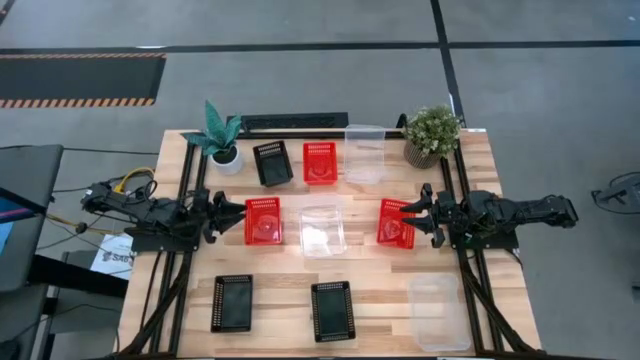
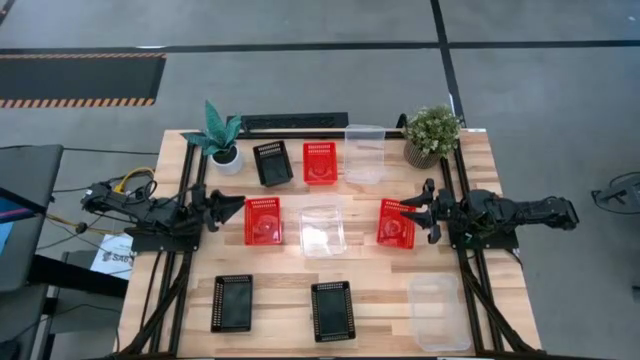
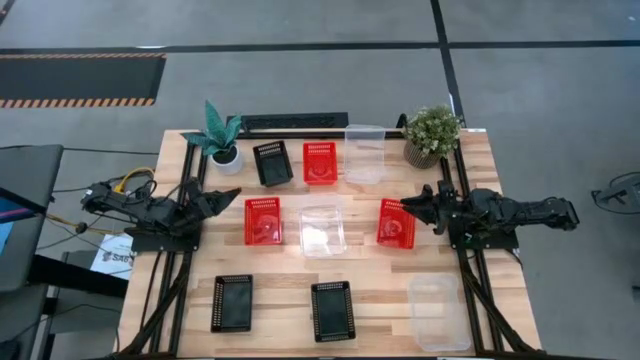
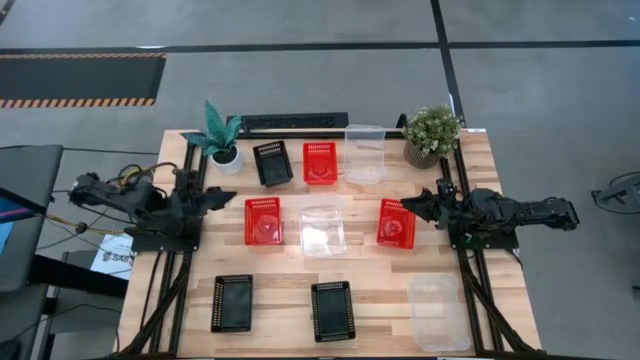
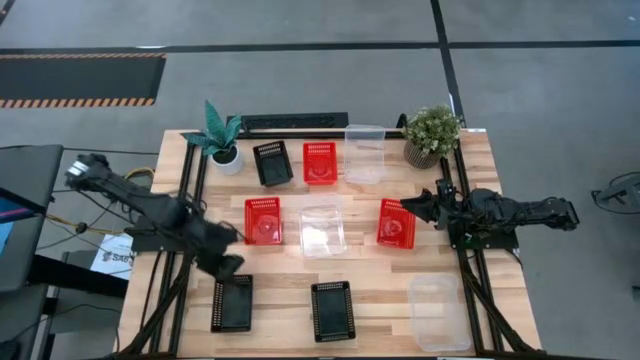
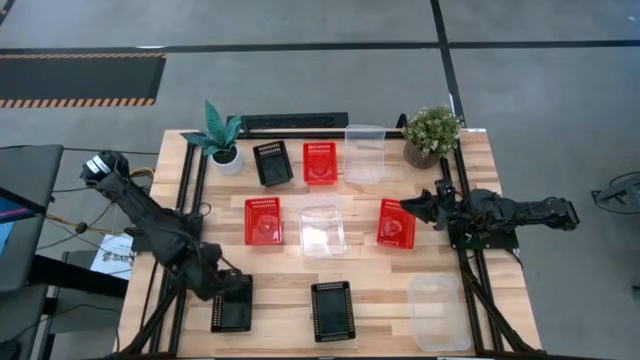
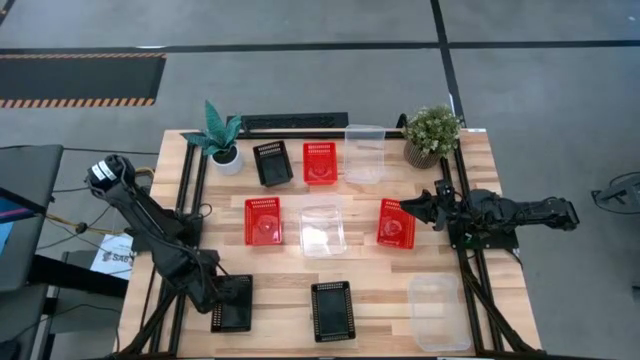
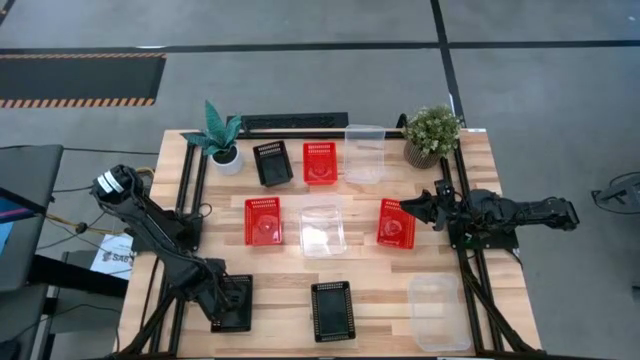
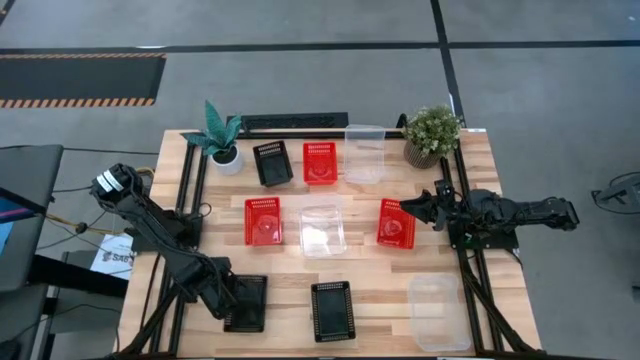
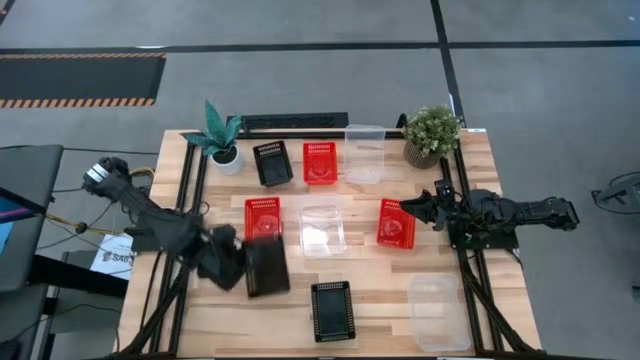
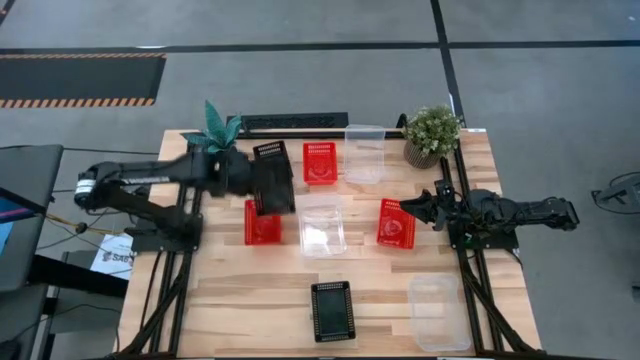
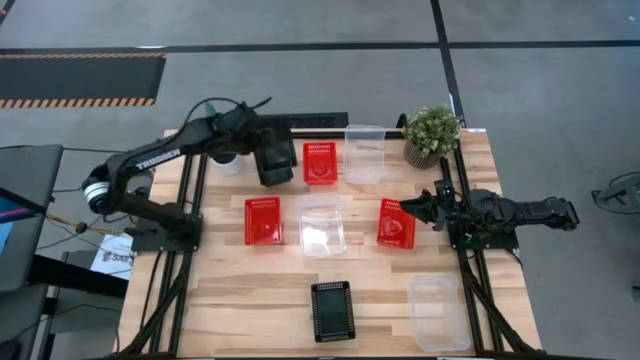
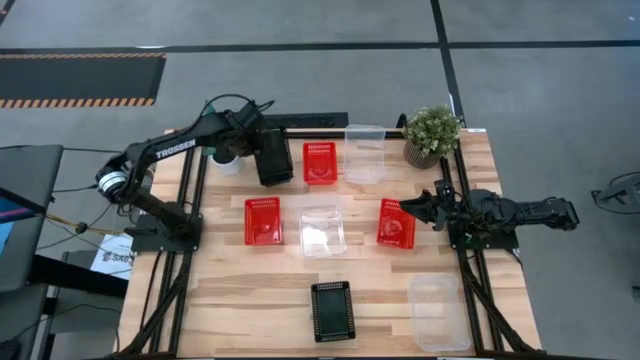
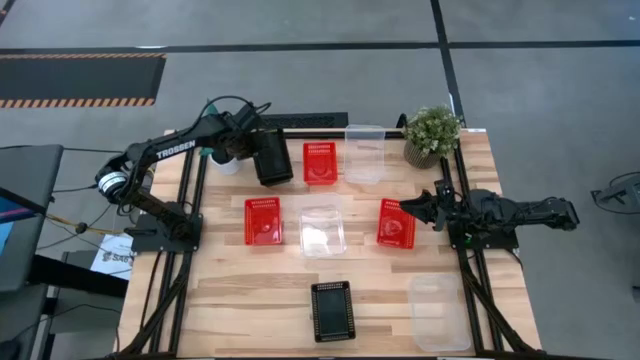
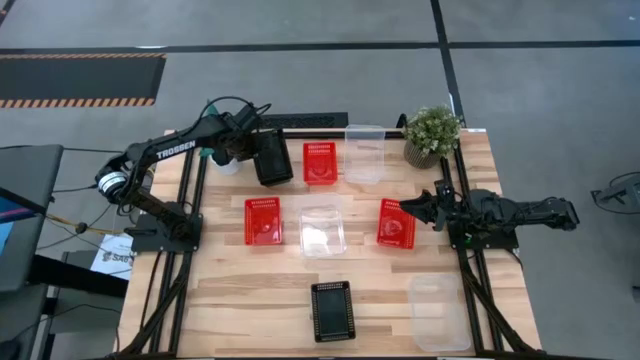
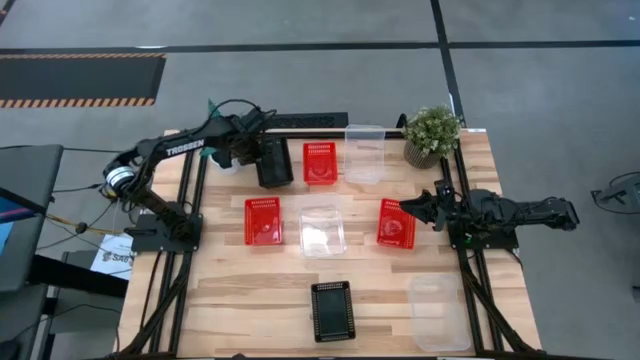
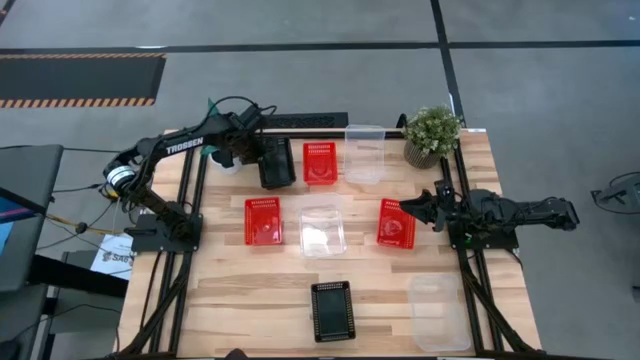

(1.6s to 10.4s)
Stack the bottom left black bin on the top black bin

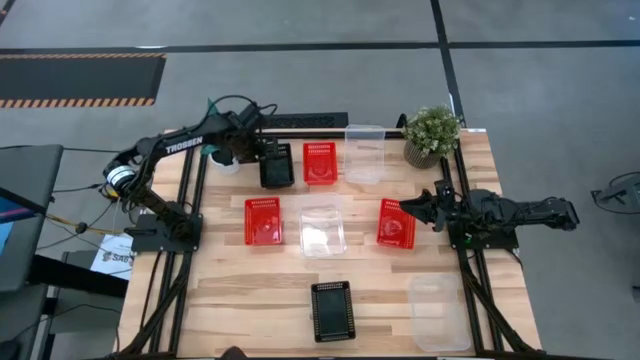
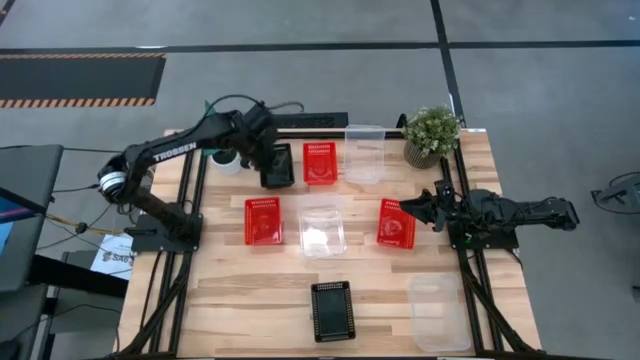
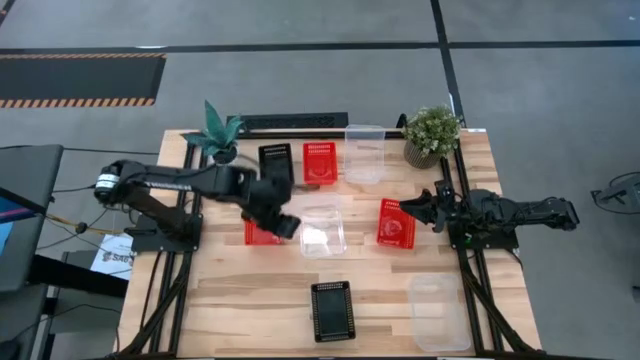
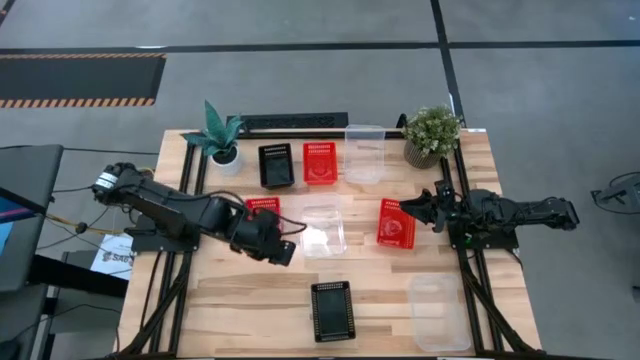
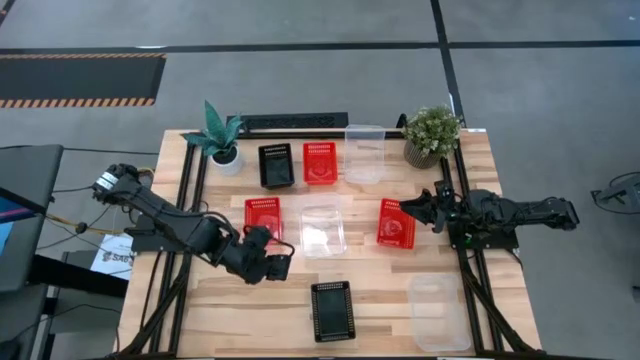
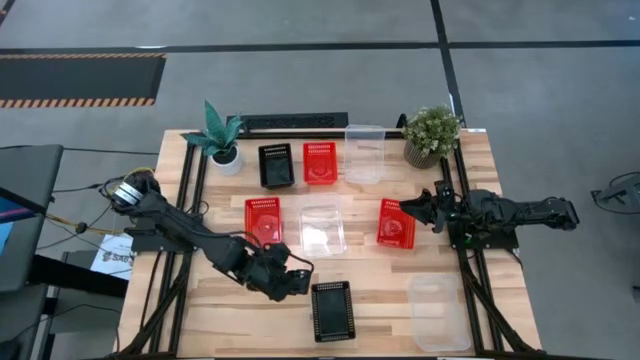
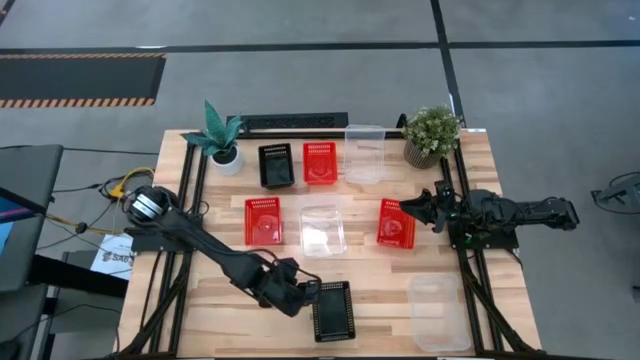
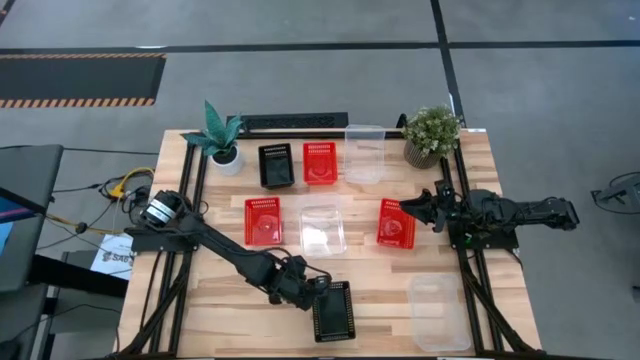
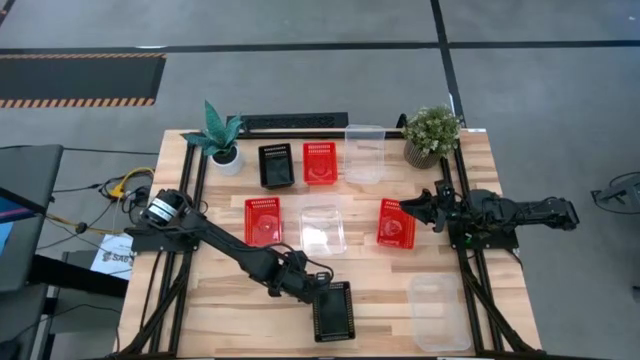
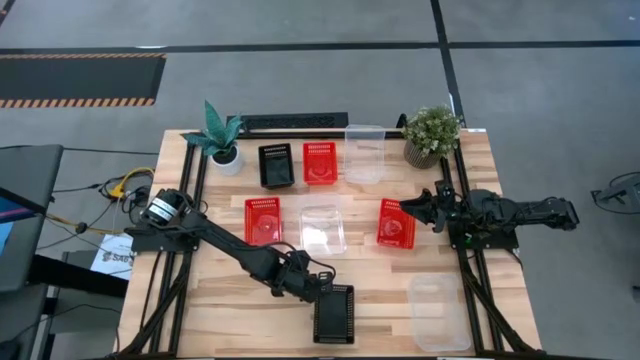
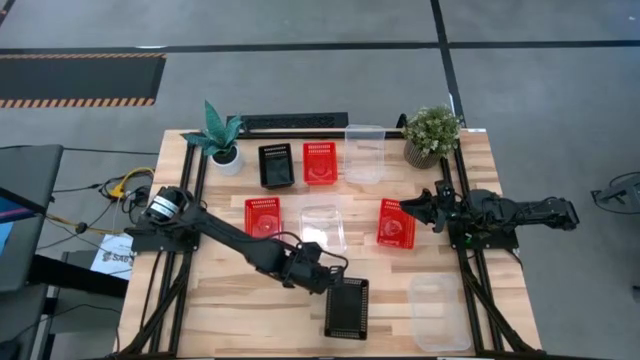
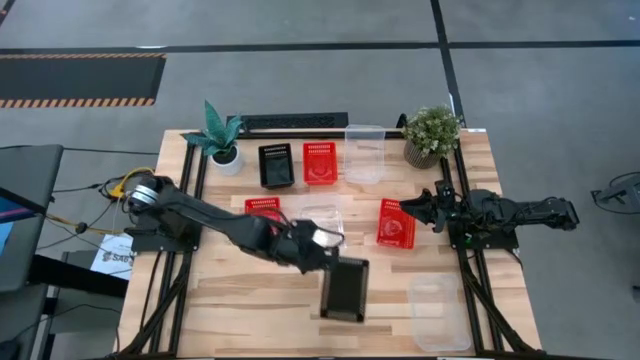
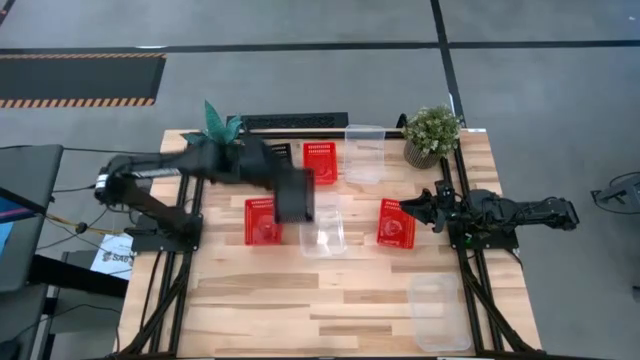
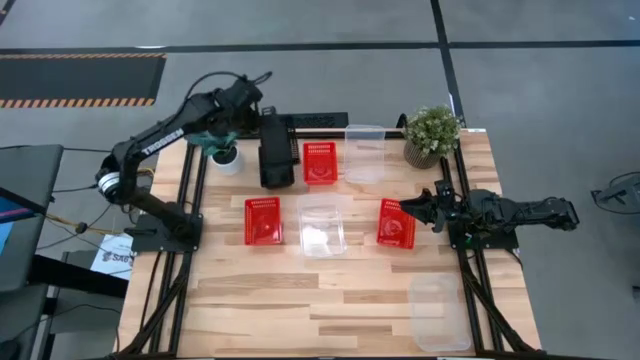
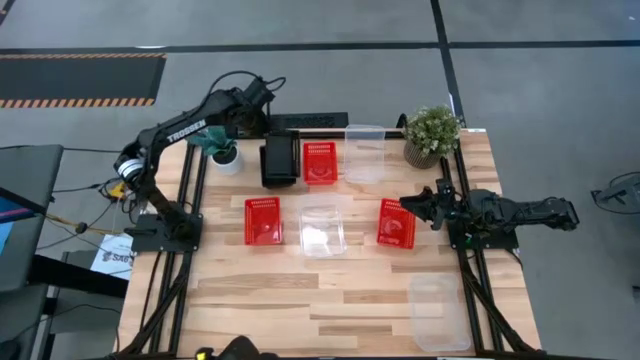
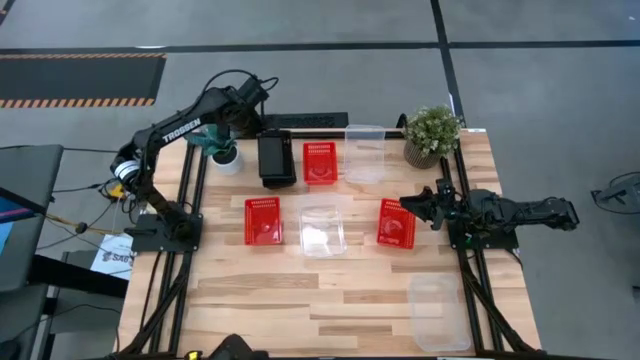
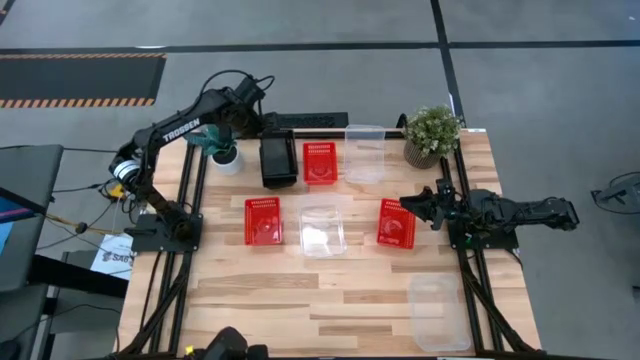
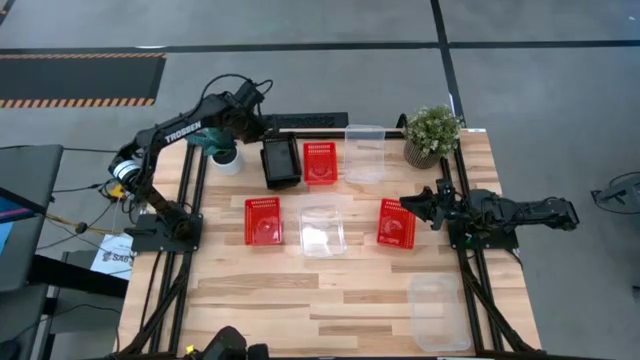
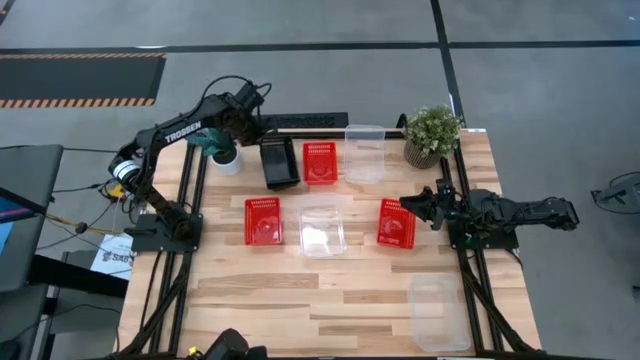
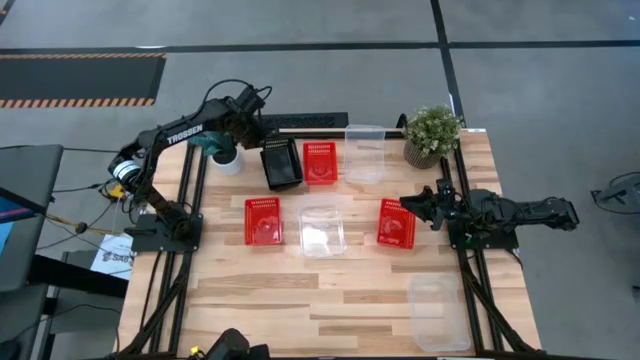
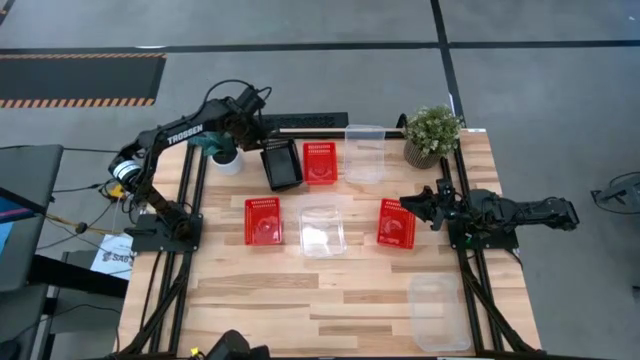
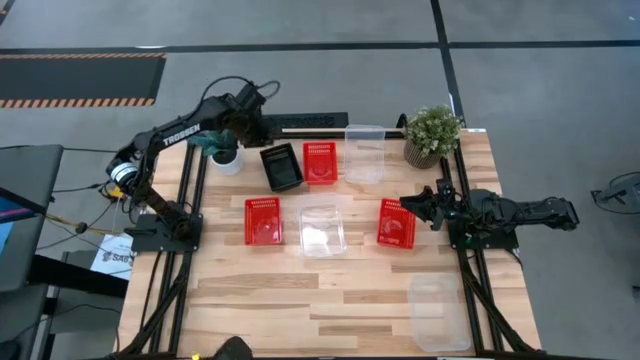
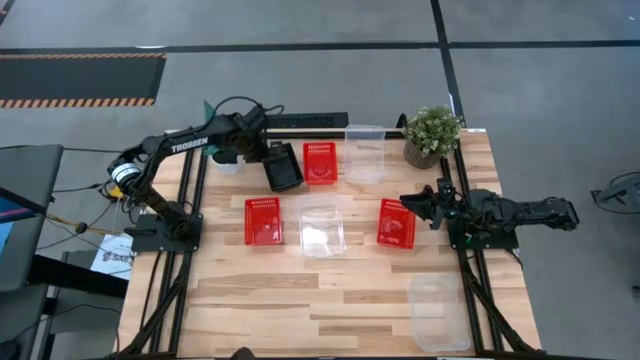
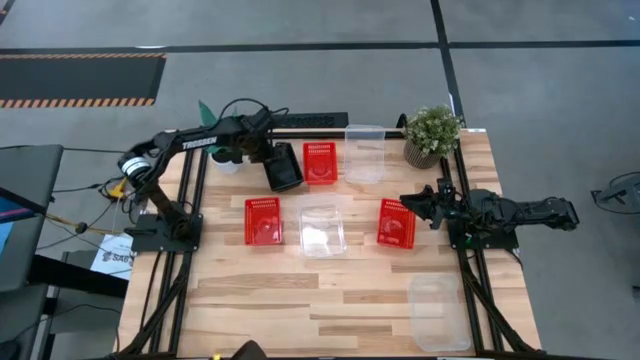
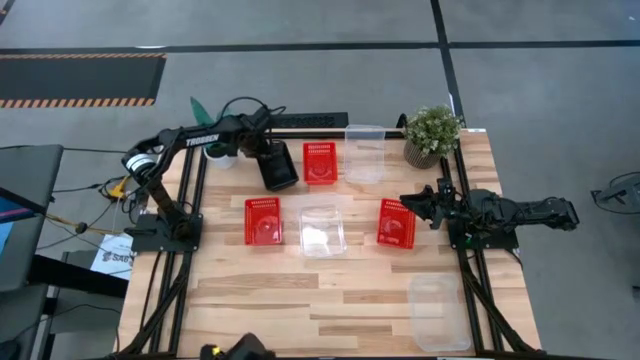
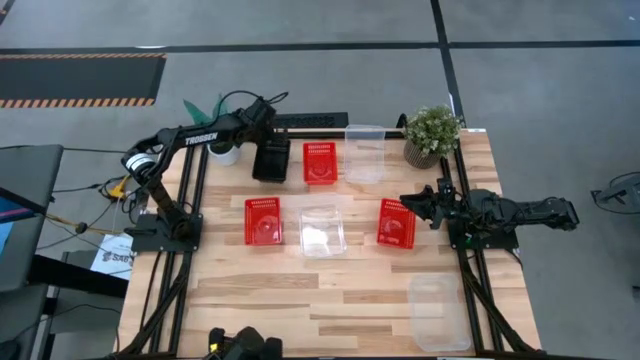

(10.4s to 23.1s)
Stack the black bin on the black bin
